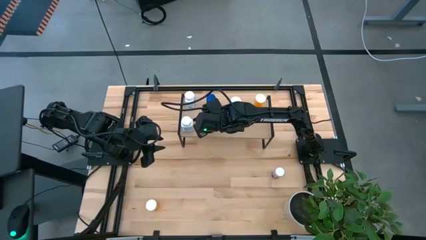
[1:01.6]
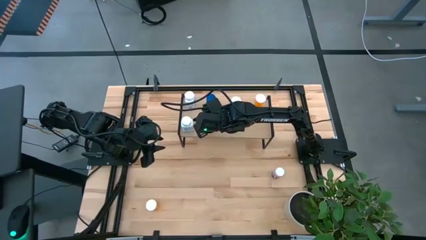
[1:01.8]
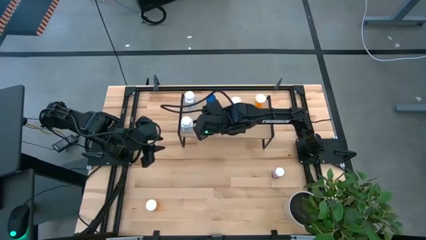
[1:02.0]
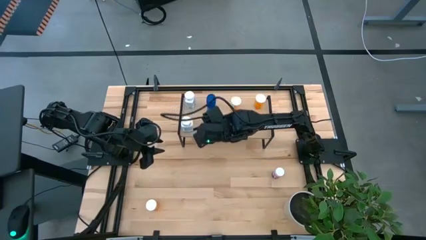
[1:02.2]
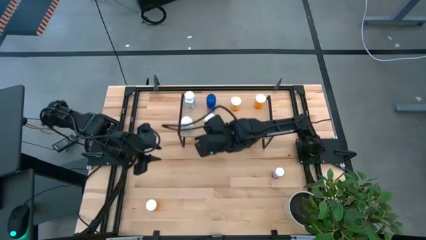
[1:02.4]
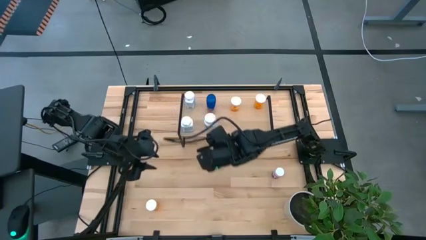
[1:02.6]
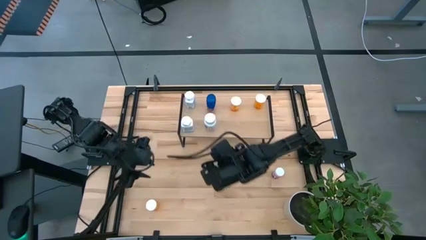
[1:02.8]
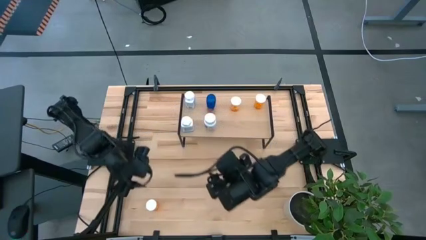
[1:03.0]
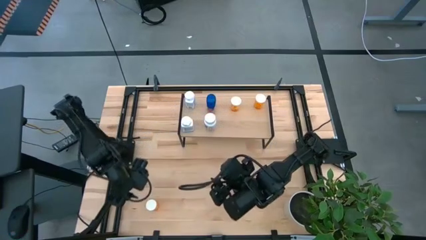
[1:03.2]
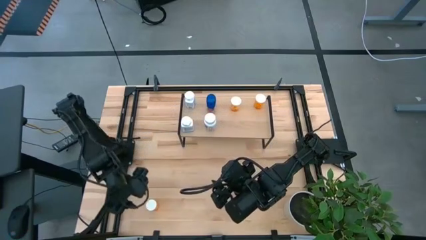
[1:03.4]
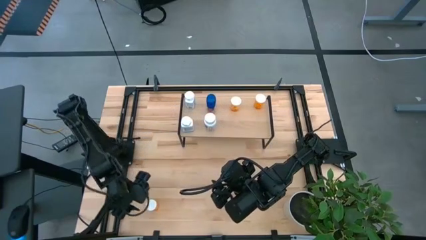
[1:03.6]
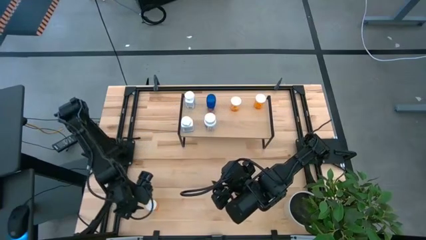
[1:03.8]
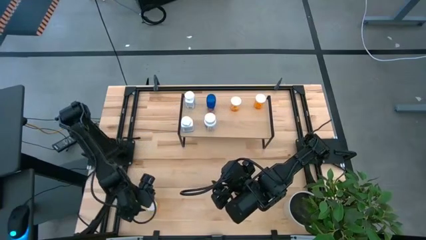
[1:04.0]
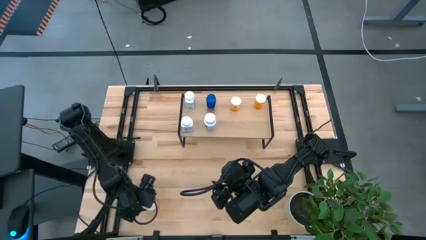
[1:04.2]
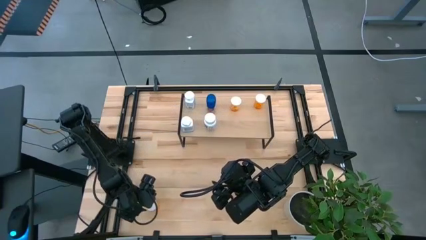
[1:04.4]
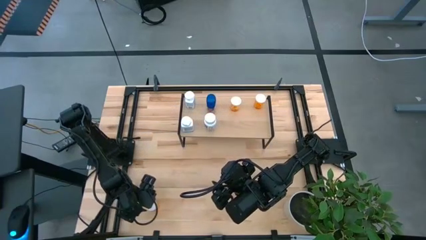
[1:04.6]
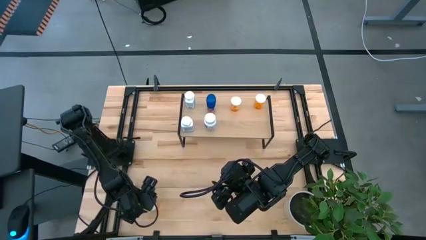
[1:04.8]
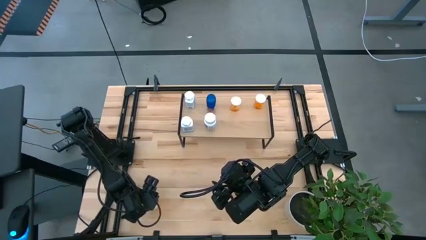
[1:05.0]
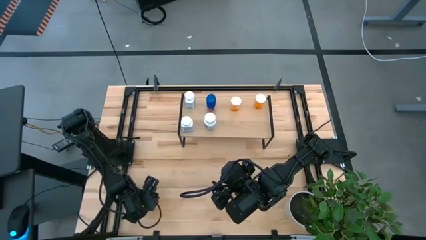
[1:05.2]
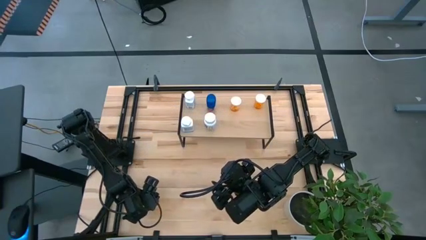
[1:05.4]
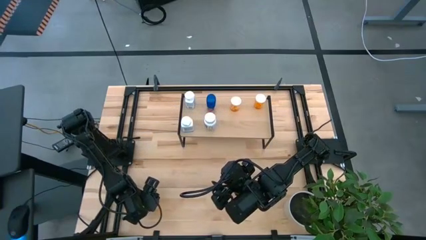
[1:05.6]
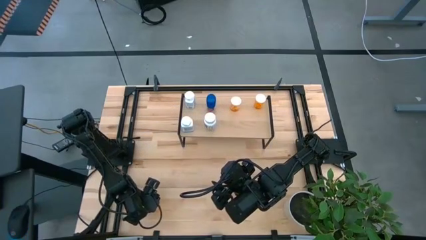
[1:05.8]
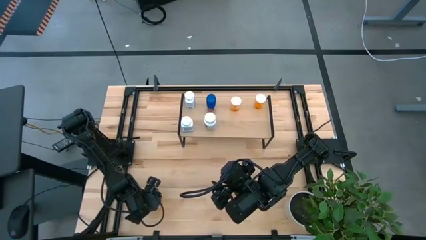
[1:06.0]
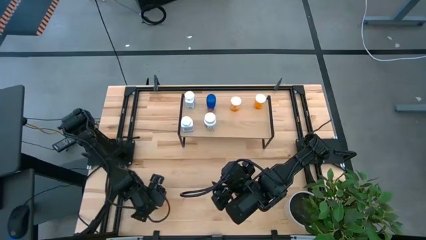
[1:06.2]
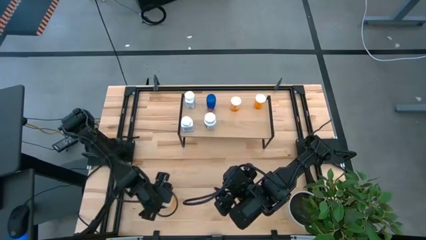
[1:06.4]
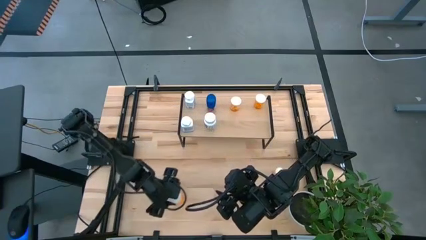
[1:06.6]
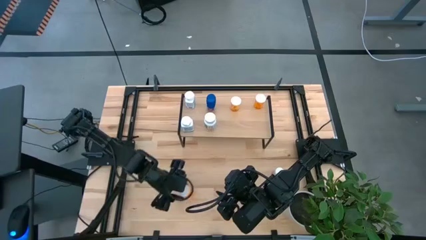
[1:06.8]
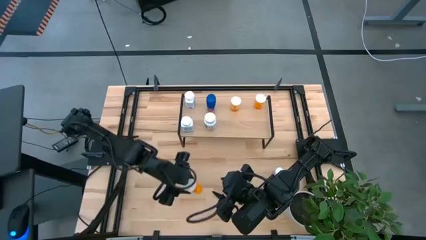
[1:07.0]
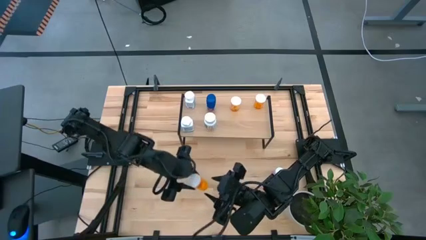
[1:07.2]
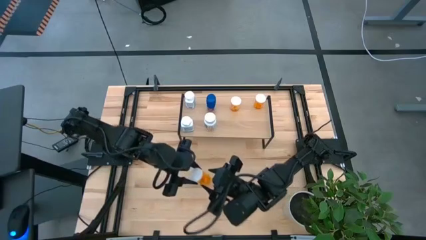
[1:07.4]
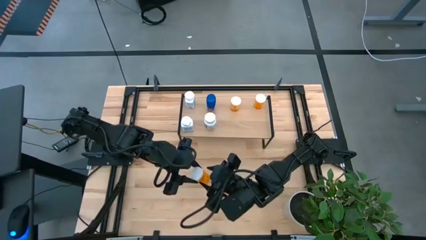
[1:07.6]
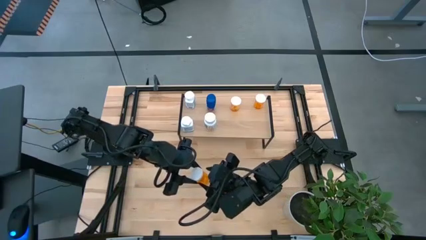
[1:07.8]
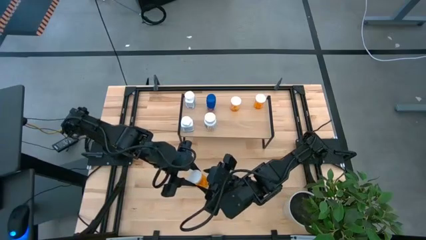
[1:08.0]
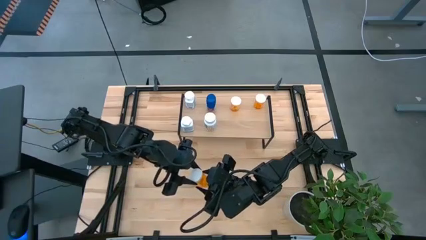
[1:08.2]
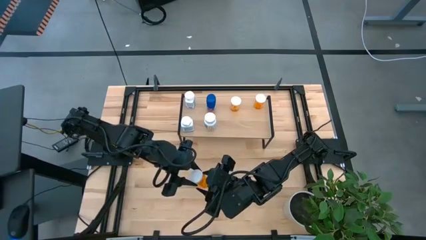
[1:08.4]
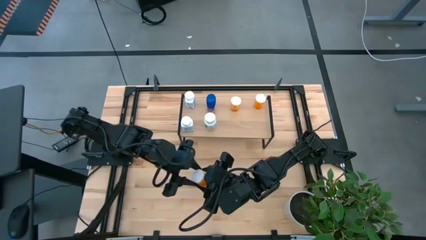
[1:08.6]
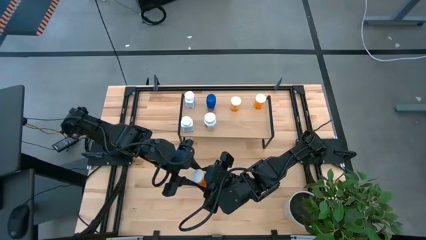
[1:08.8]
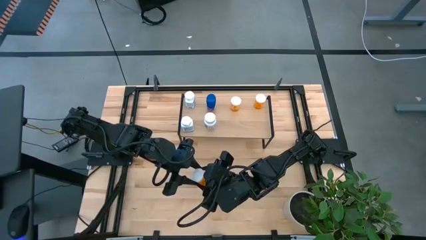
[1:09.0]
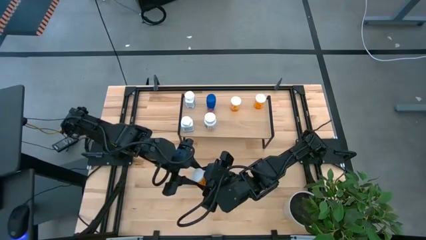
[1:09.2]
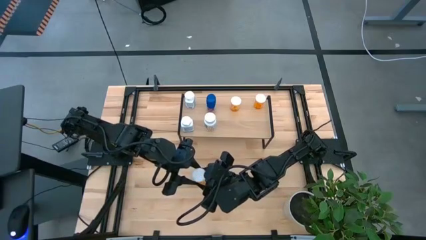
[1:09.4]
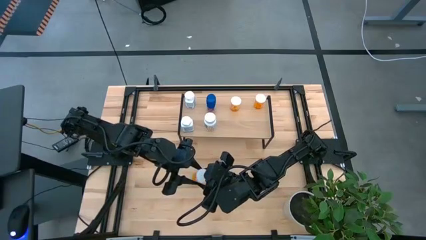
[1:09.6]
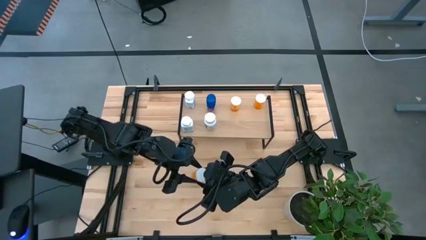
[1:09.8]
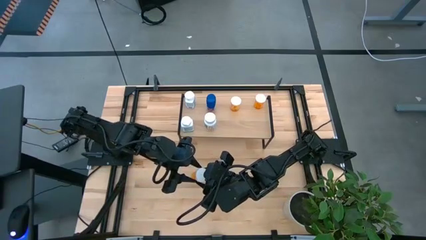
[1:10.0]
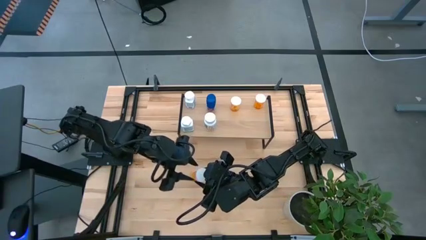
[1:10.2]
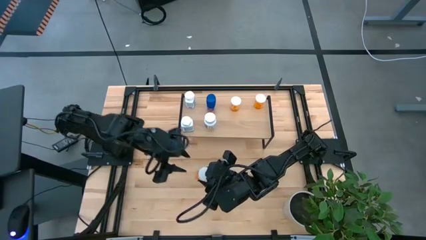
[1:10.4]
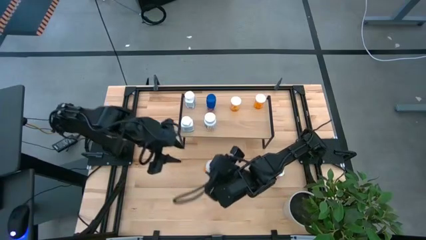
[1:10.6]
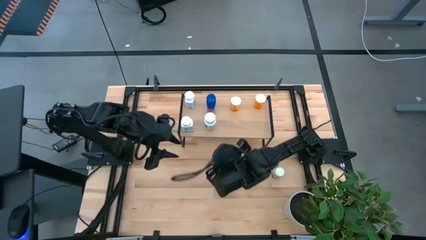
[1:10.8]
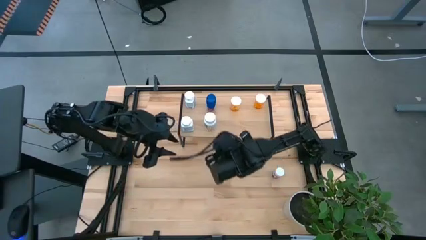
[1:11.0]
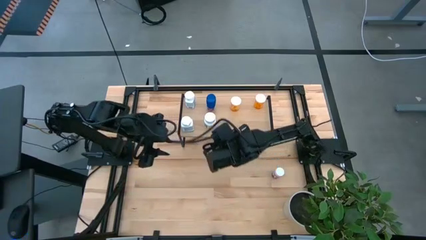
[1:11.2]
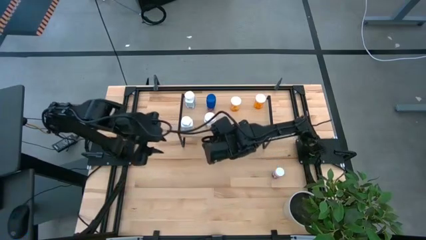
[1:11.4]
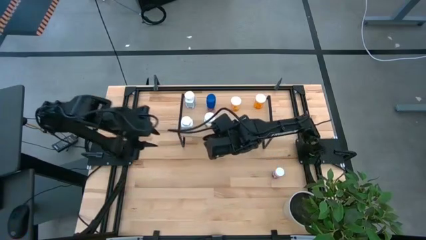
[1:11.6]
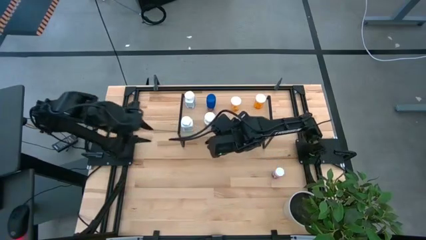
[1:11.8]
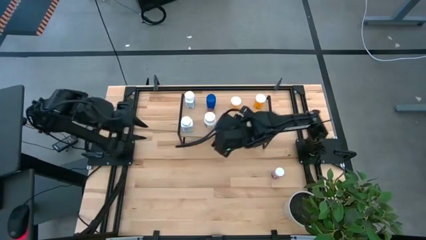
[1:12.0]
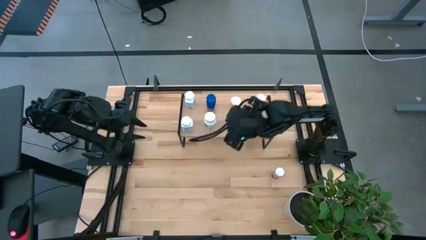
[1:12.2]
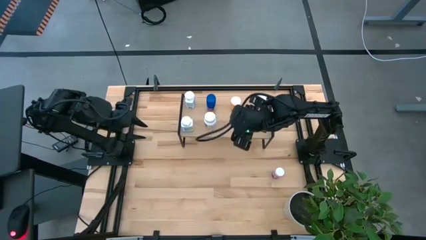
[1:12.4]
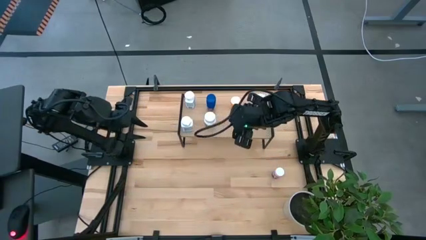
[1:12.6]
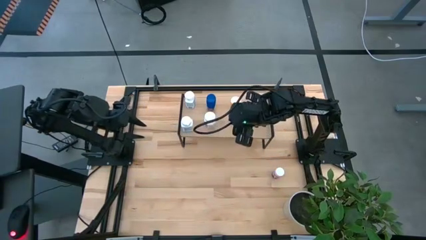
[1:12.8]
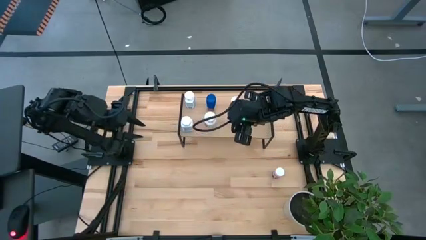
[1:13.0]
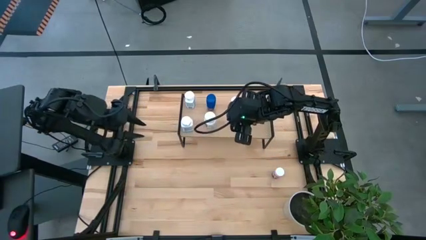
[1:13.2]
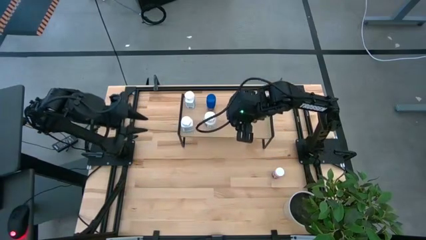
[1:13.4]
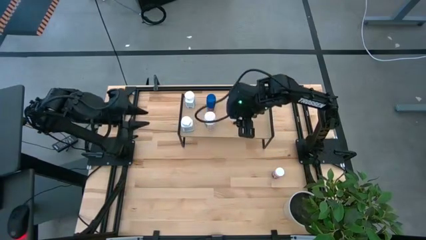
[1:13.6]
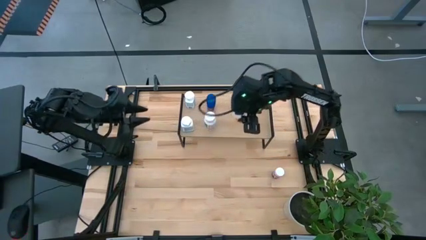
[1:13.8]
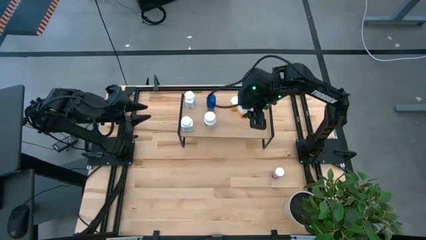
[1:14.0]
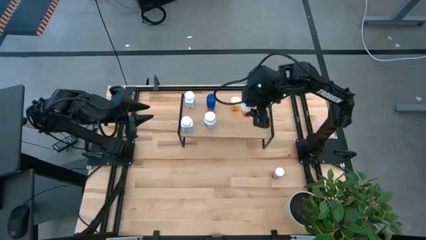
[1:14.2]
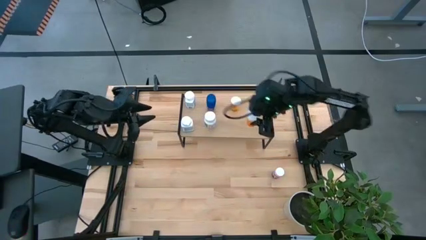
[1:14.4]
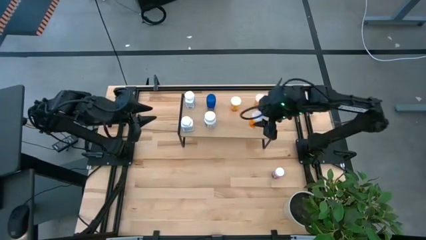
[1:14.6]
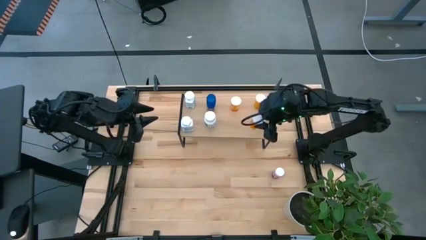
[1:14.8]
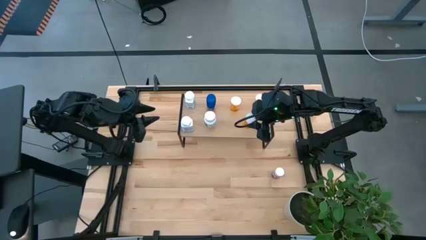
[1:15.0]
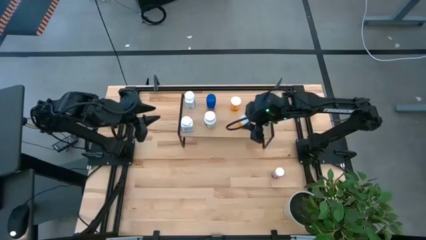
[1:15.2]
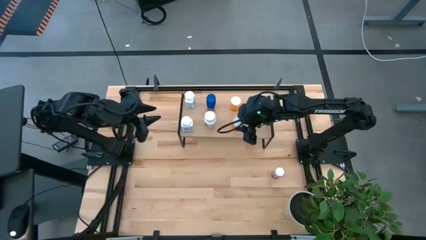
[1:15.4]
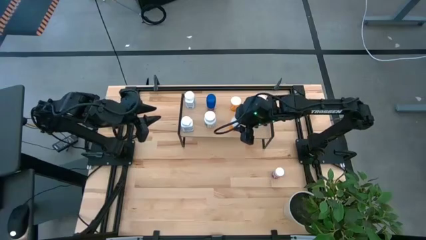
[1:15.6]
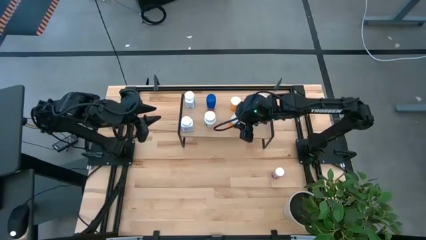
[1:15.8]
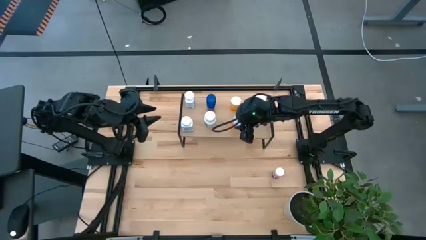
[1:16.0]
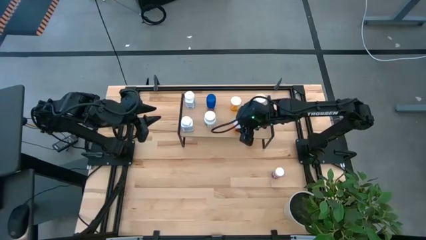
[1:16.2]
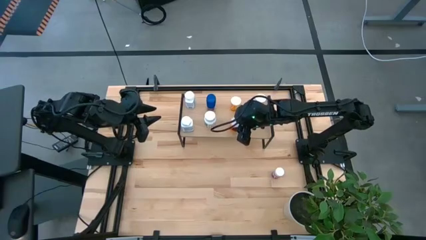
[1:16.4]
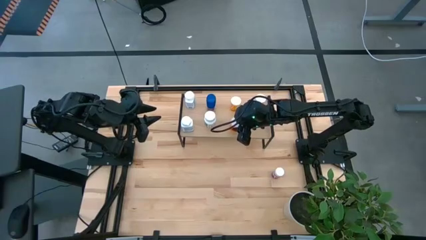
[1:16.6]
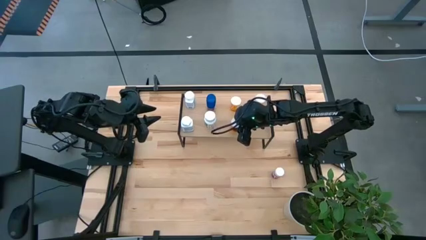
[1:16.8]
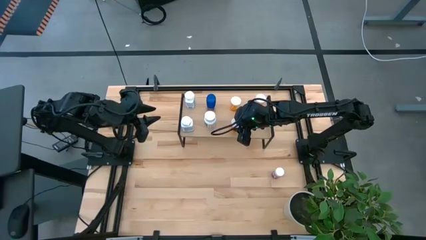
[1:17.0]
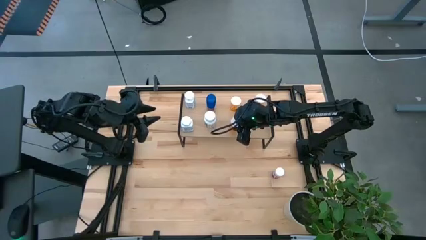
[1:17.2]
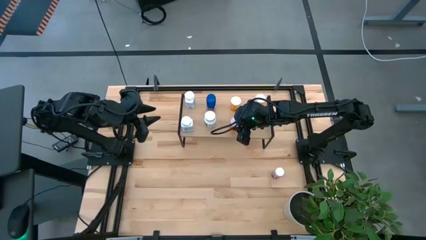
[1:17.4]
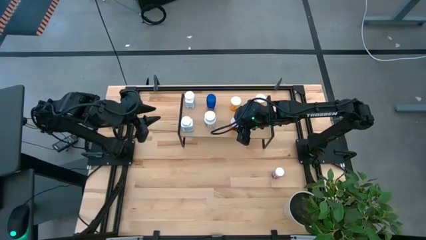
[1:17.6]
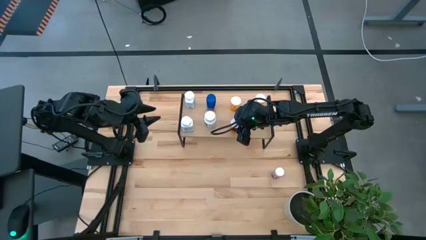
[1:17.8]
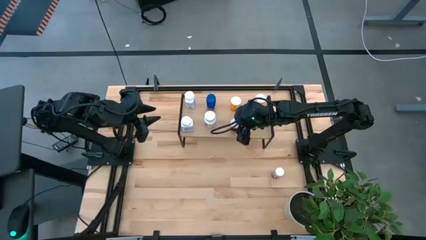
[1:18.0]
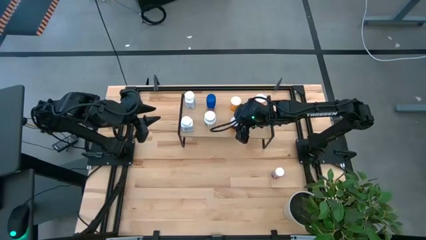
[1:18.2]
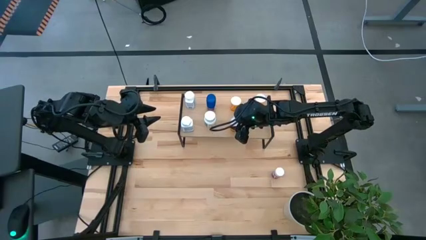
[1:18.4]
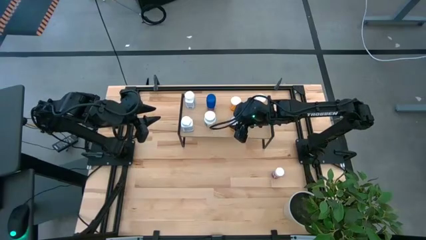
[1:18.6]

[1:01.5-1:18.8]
Task: Pick and place medicine bottles onto shelf by color
Put the orange pill bottle on the shelf
